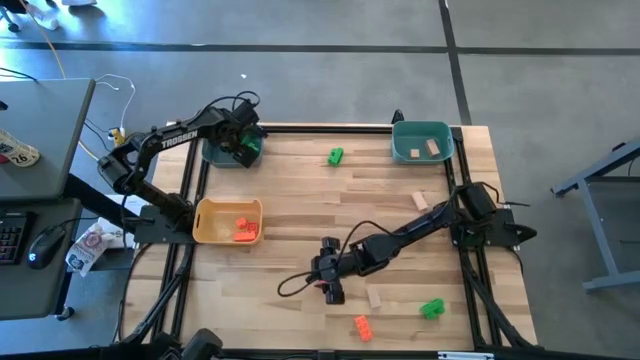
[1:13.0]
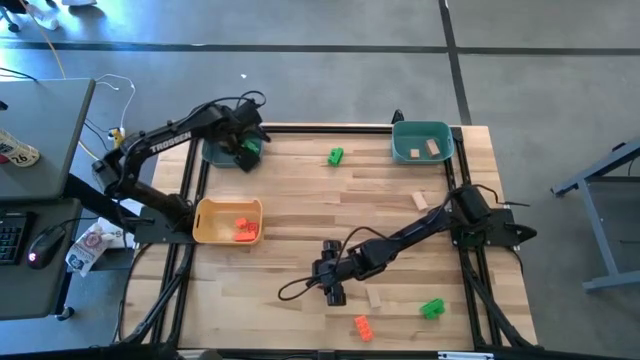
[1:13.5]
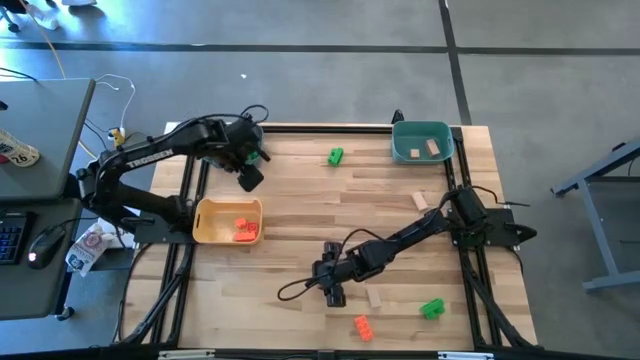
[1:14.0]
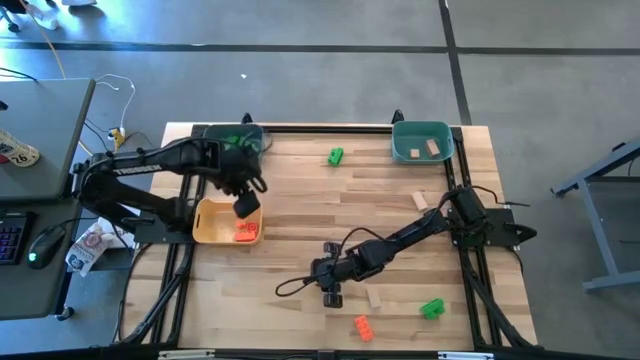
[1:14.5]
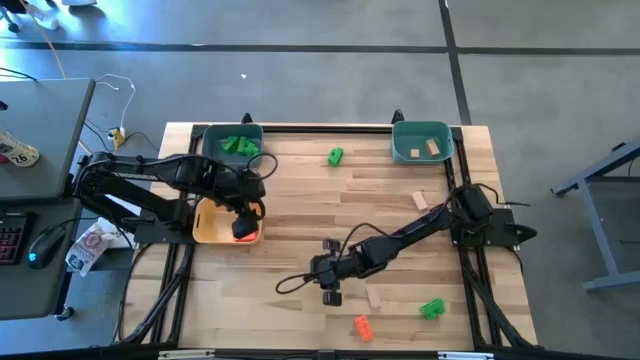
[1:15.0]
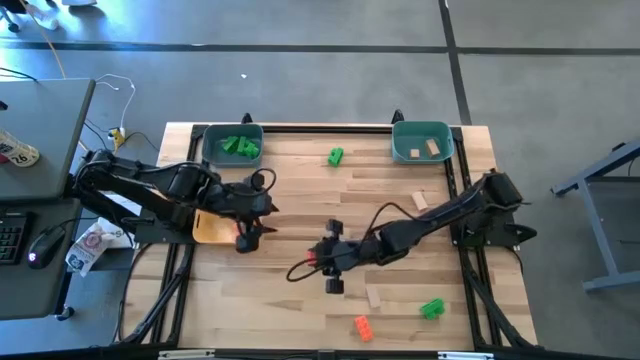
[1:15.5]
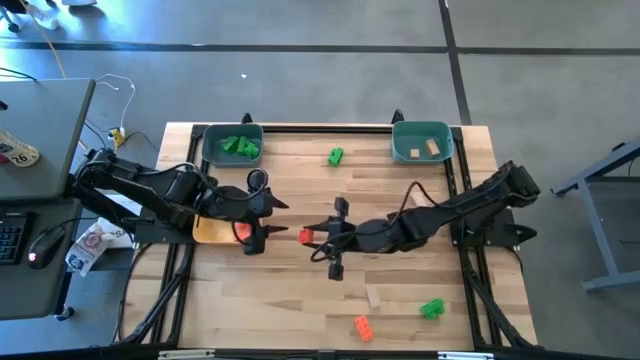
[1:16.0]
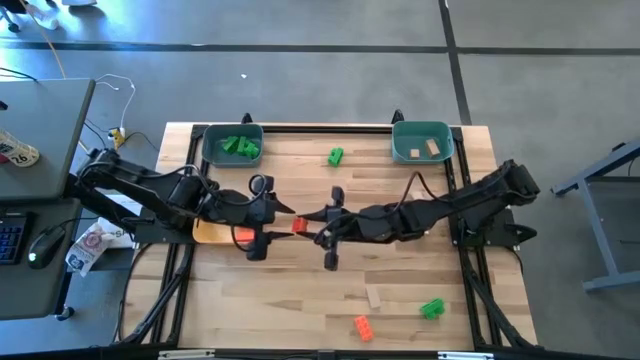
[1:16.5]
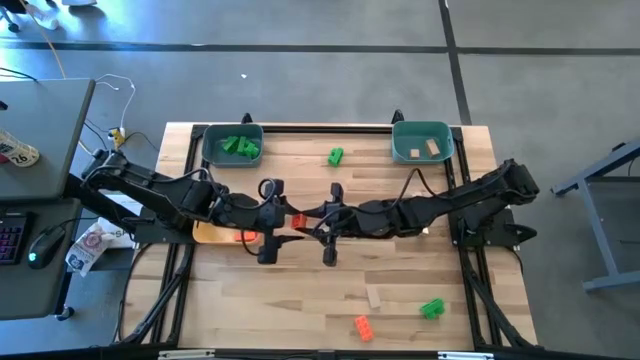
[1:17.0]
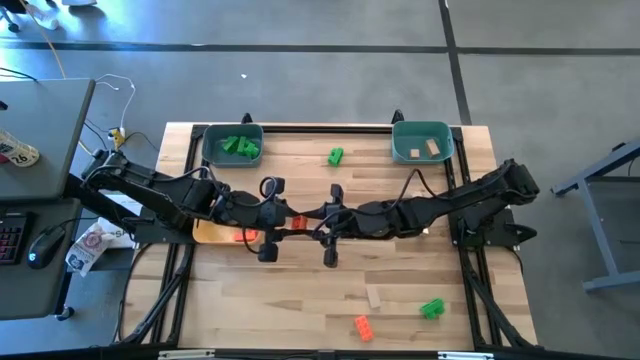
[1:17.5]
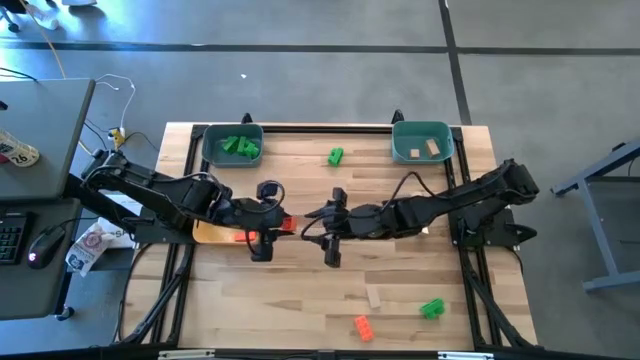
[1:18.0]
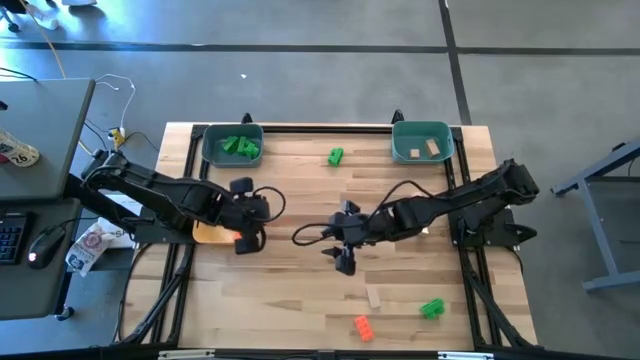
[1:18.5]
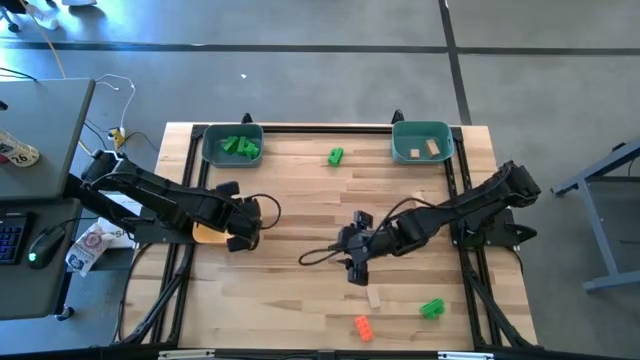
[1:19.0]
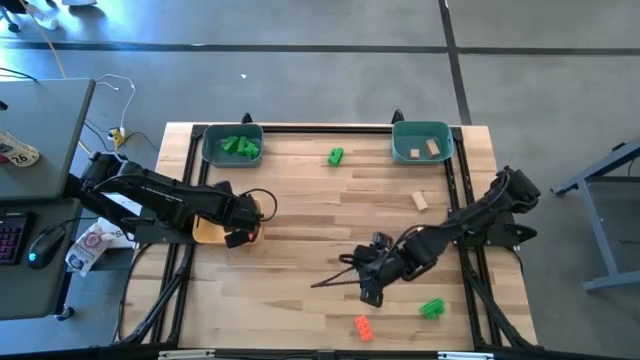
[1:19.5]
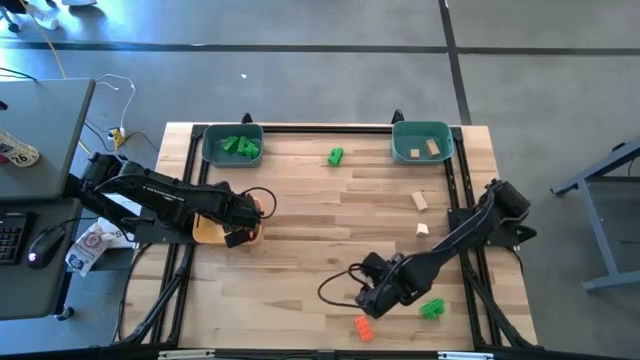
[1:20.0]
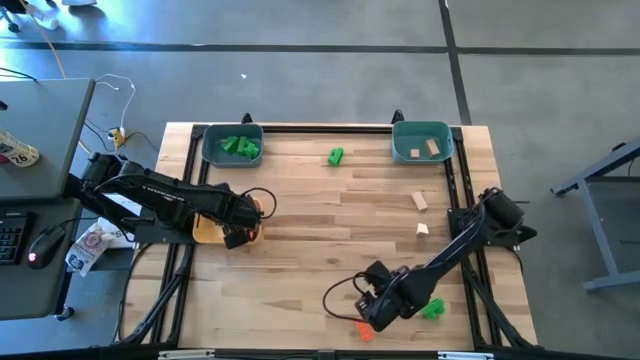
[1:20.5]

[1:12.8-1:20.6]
Task: Sort & place blocks by color
Put the orange game piece into the yellow bin

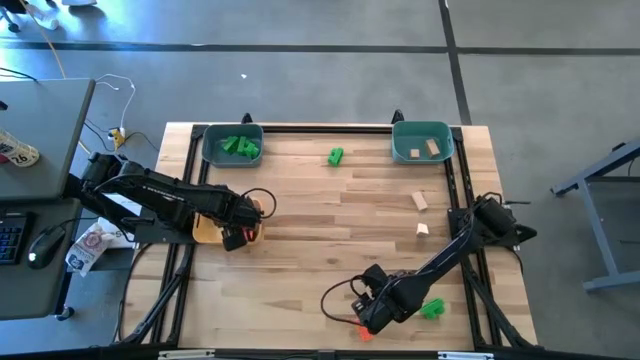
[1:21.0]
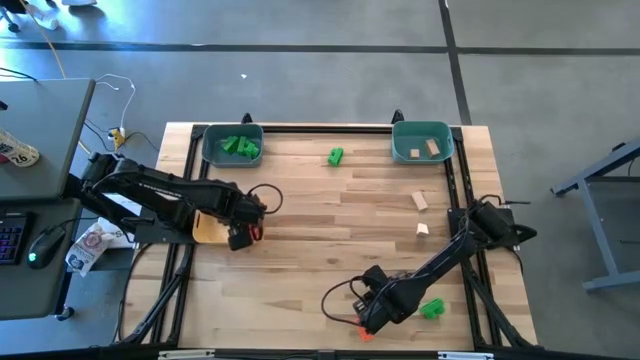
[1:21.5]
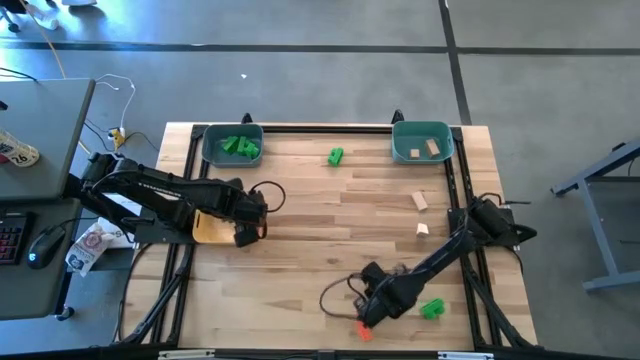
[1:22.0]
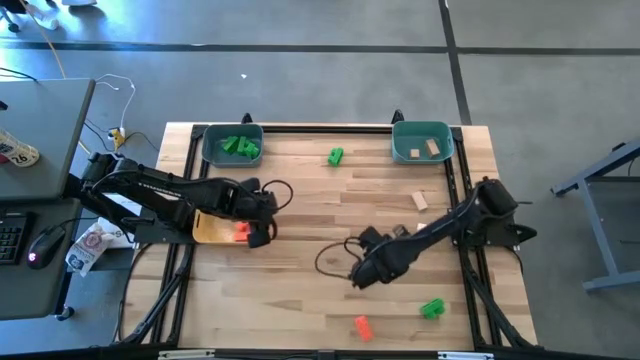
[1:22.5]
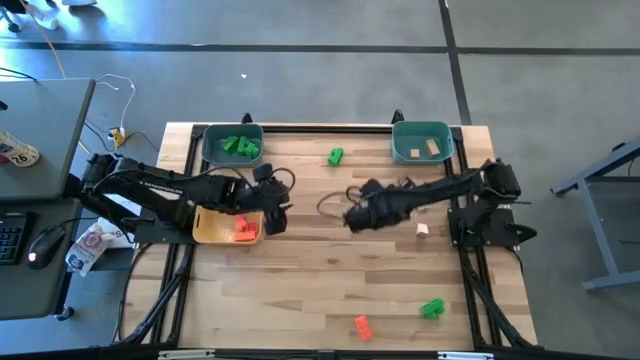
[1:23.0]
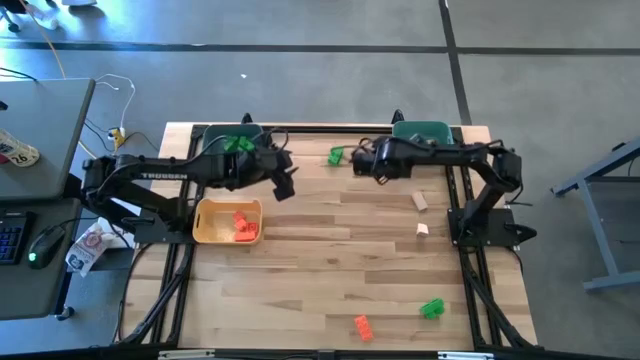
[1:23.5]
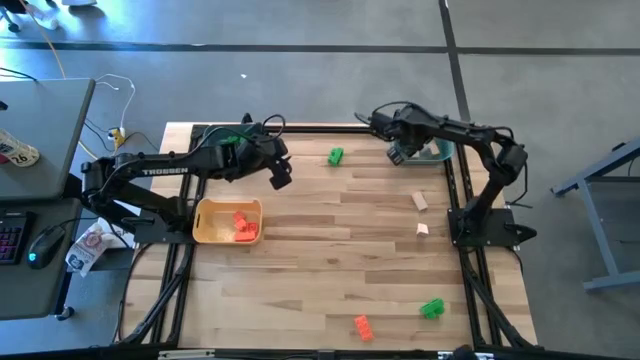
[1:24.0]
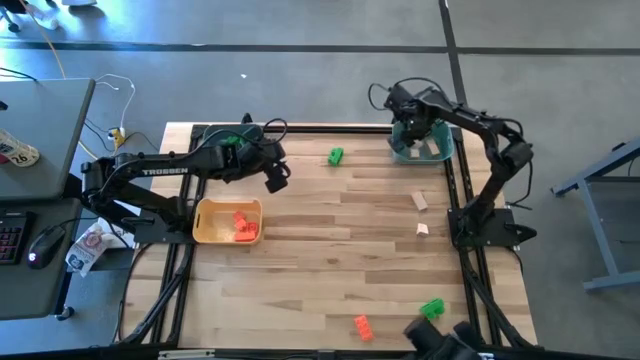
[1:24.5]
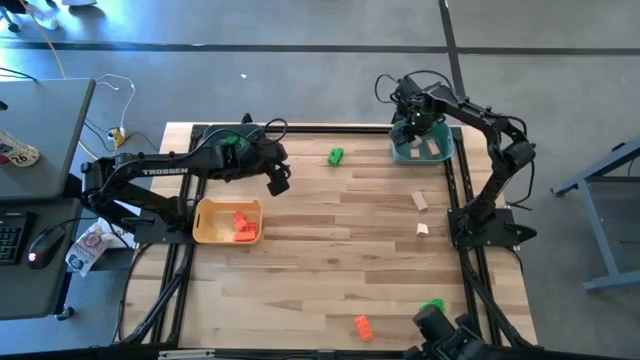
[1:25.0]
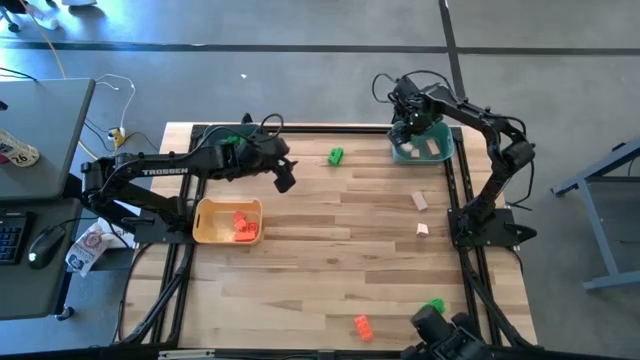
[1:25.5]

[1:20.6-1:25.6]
Put the brown block into the green bin

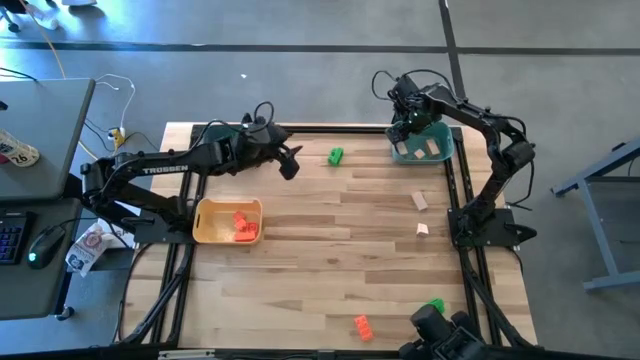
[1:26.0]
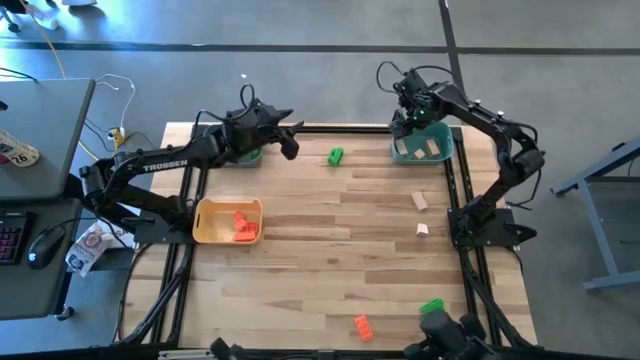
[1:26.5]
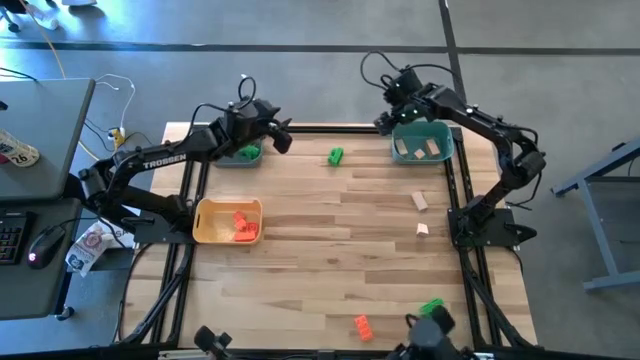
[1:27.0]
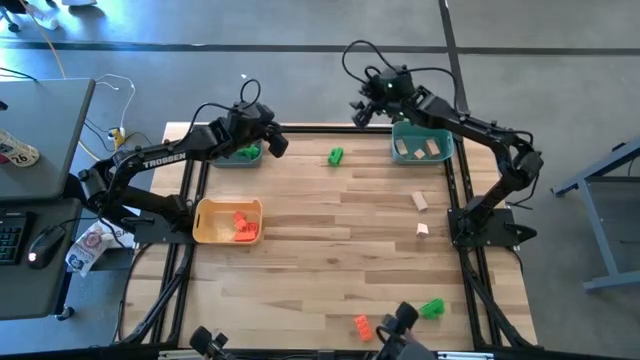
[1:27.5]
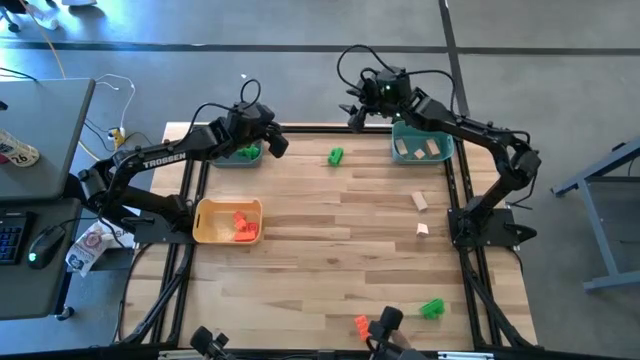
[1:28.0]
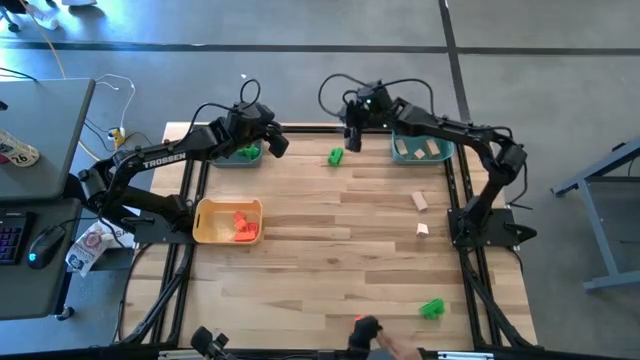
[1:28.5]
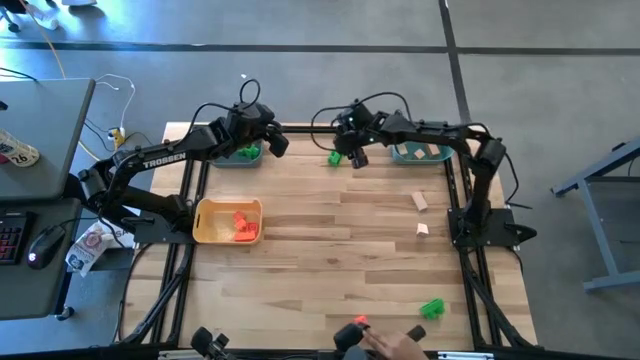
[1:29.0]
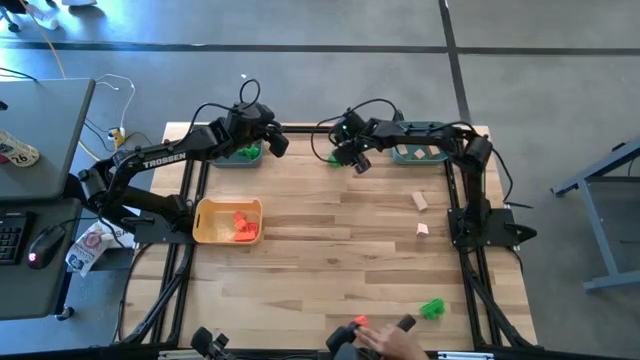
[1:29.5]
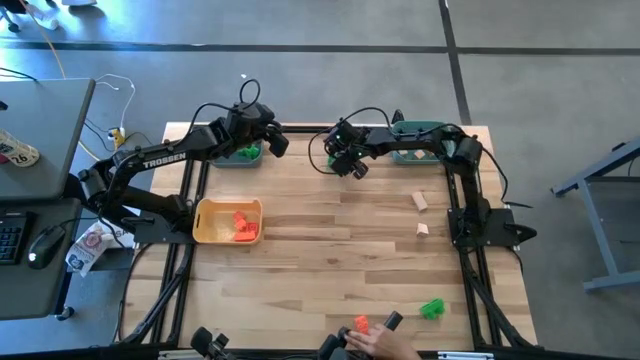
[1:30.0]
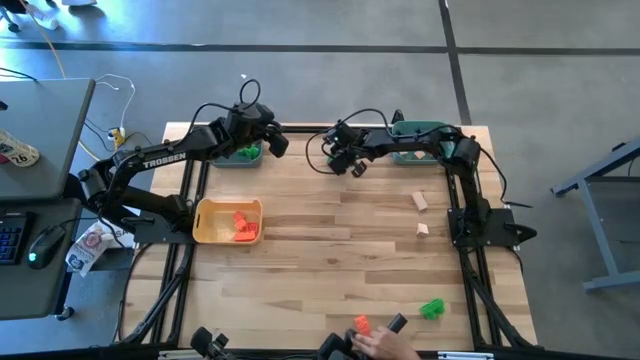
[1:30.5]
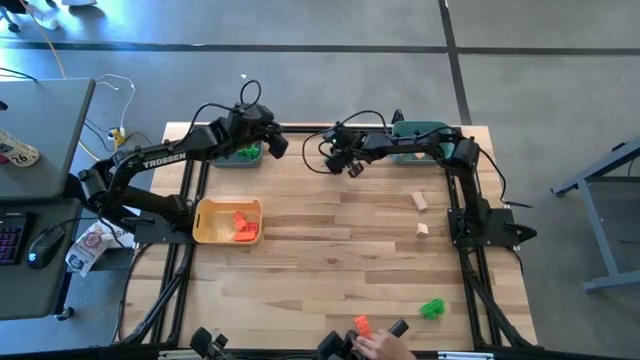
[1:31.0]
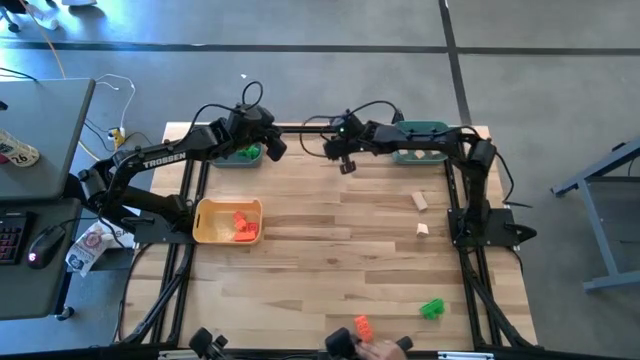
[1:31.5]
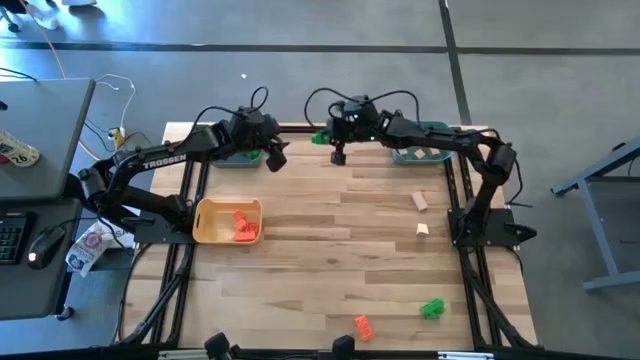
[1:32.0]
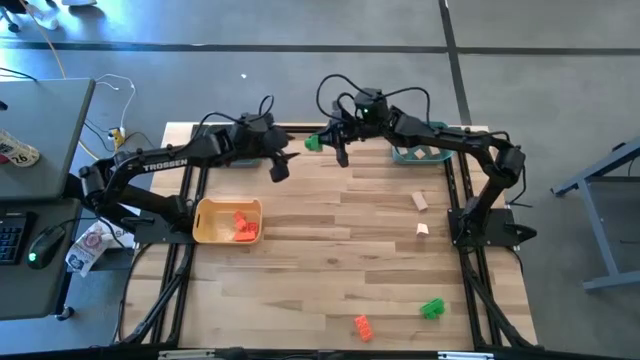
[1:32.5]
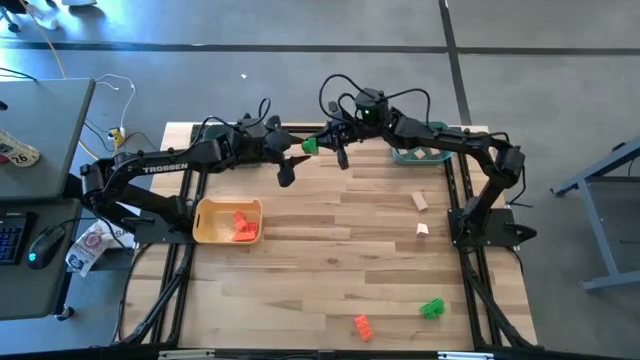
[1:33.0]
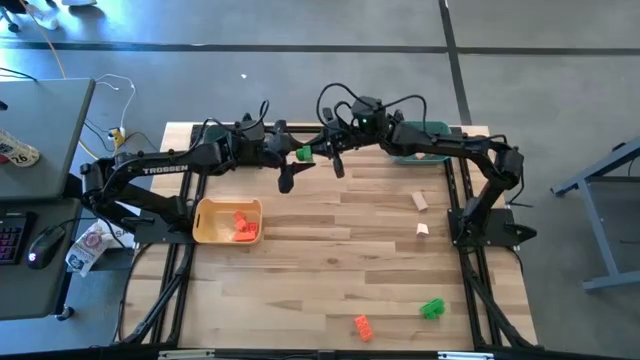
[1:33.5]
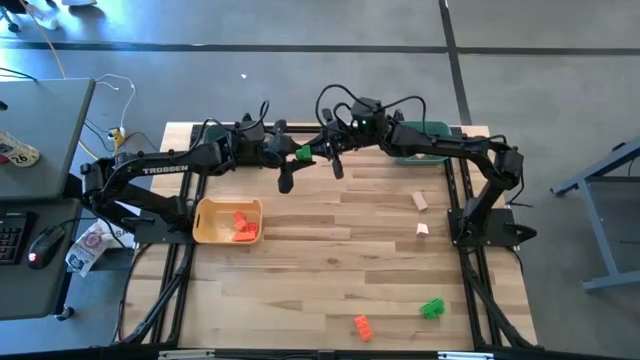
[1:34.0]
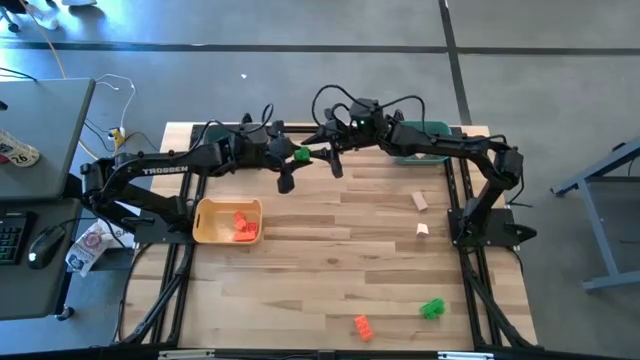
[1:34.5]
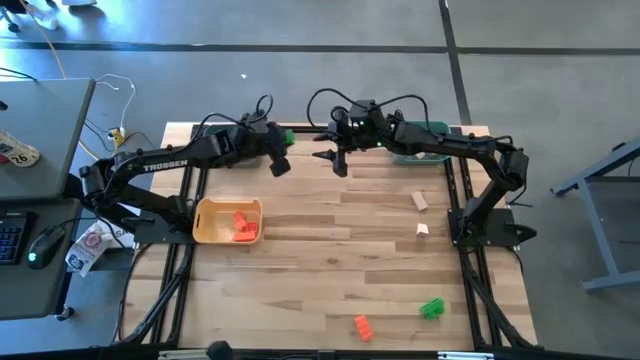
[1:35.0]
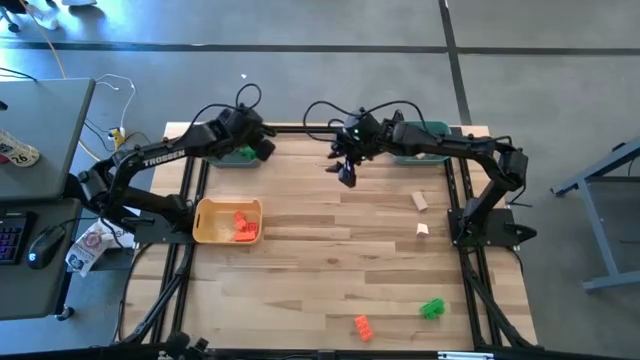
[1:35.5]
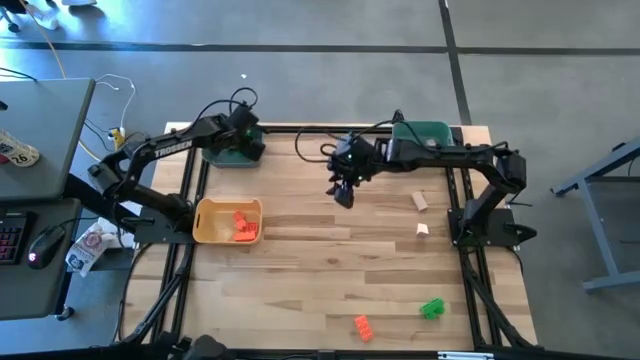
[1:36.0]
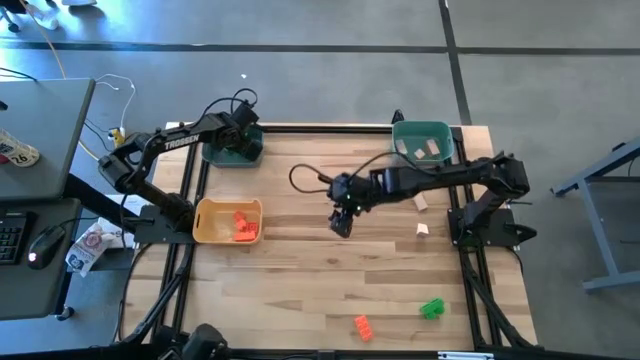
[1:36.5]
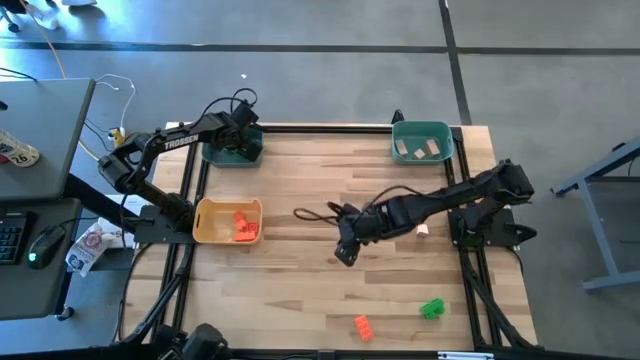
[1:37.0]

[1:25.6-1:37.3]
Put the green game piece into the blue bin
